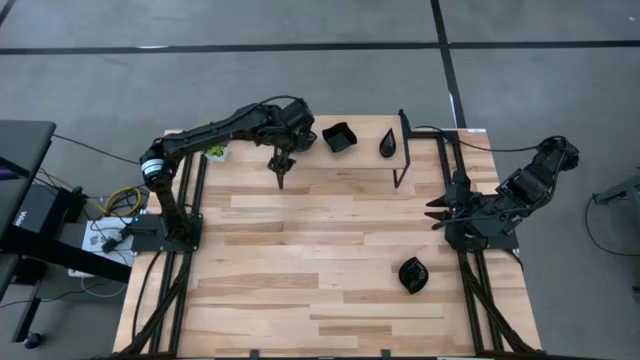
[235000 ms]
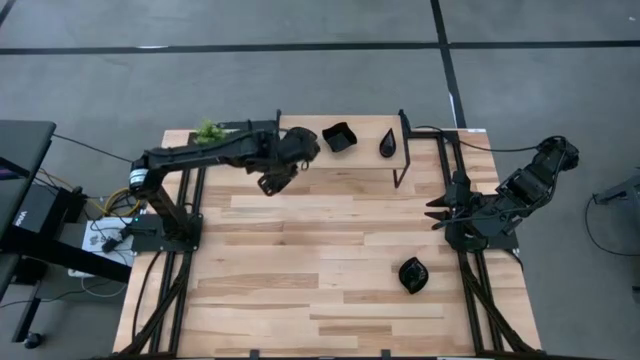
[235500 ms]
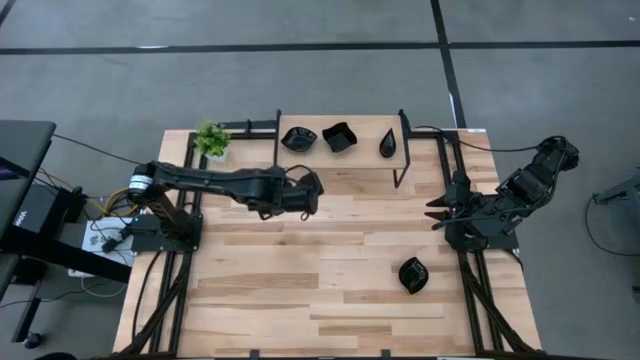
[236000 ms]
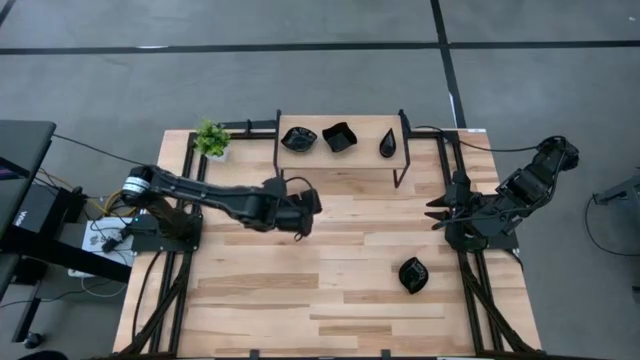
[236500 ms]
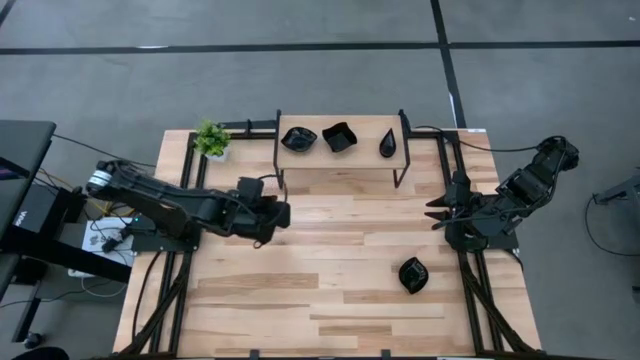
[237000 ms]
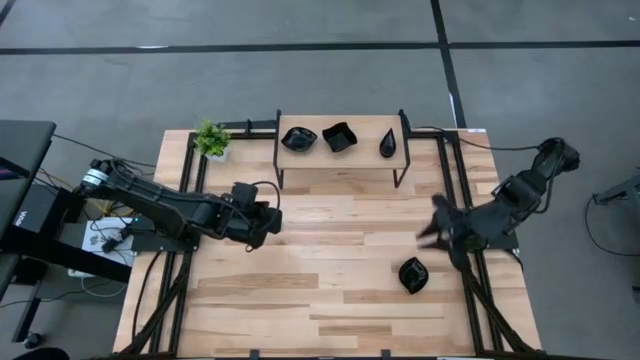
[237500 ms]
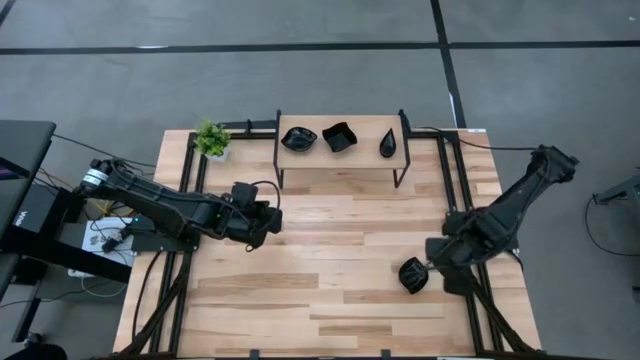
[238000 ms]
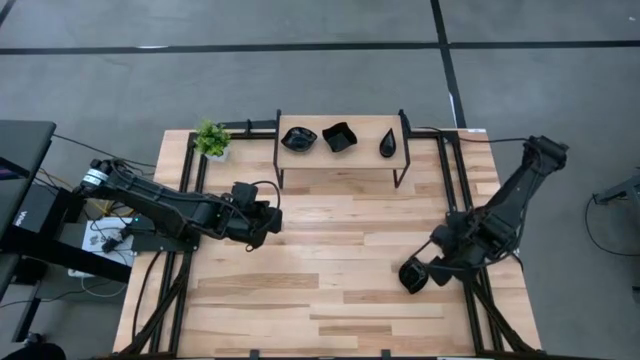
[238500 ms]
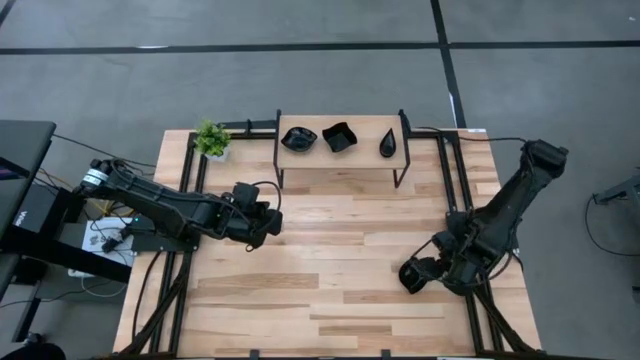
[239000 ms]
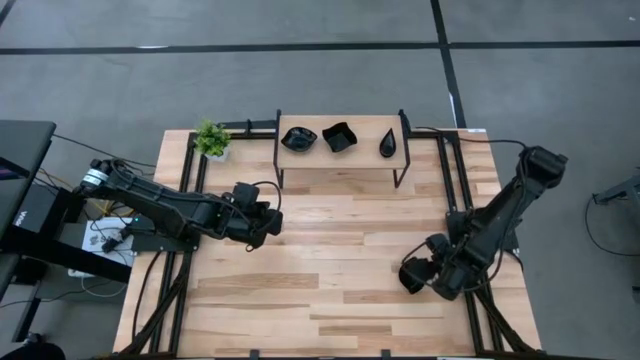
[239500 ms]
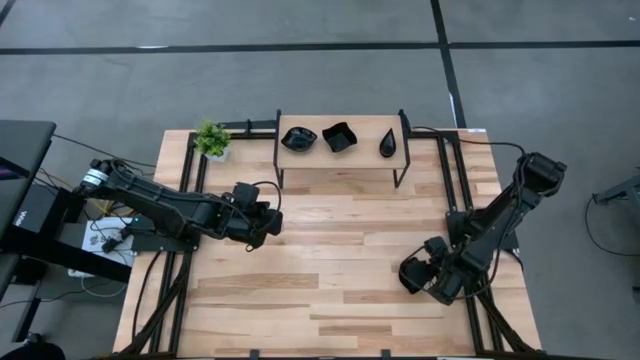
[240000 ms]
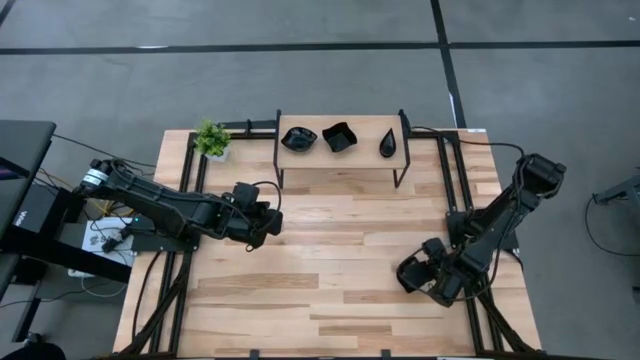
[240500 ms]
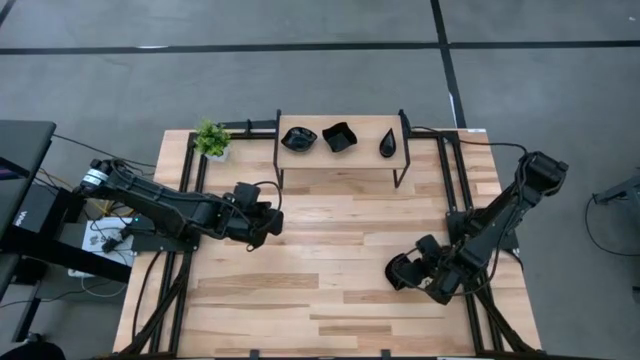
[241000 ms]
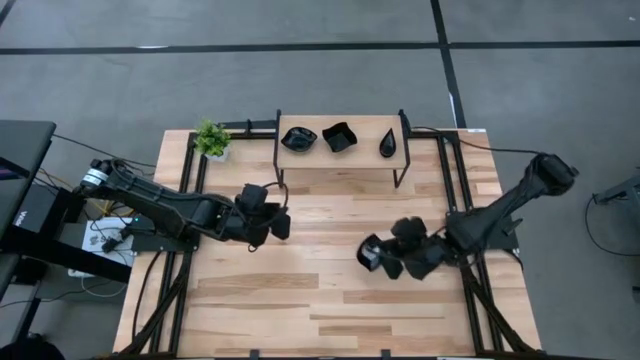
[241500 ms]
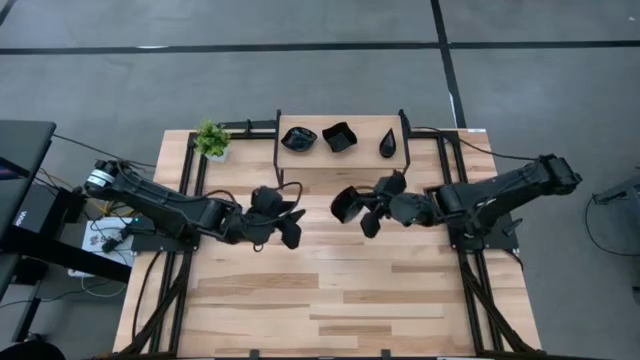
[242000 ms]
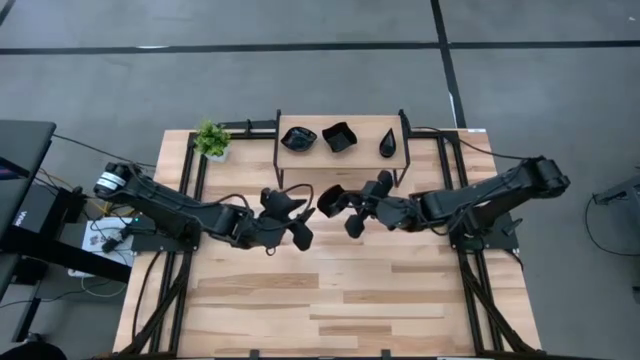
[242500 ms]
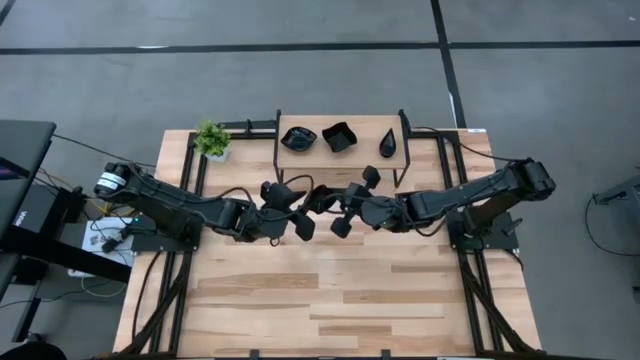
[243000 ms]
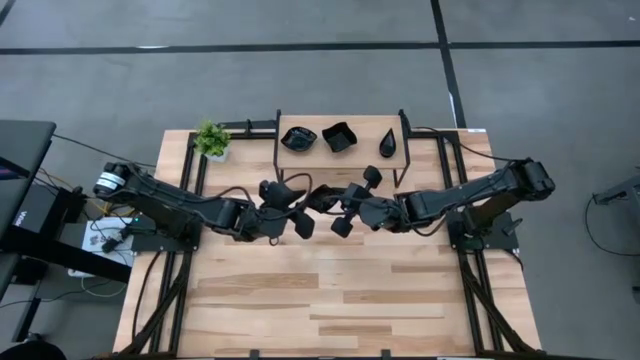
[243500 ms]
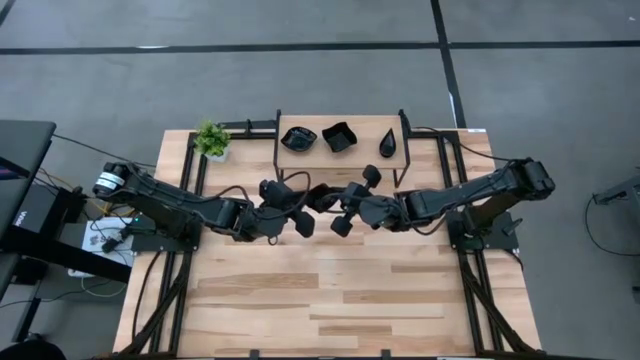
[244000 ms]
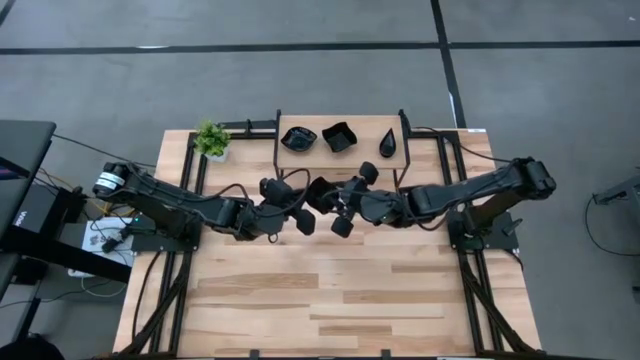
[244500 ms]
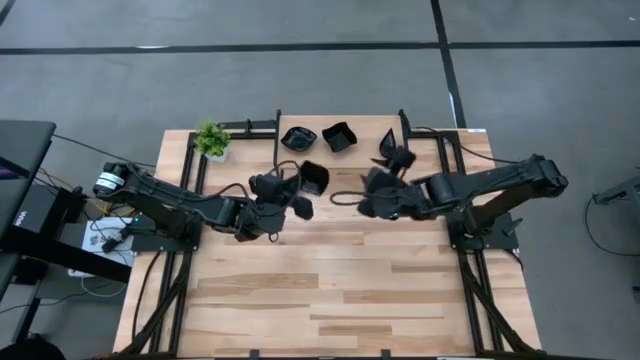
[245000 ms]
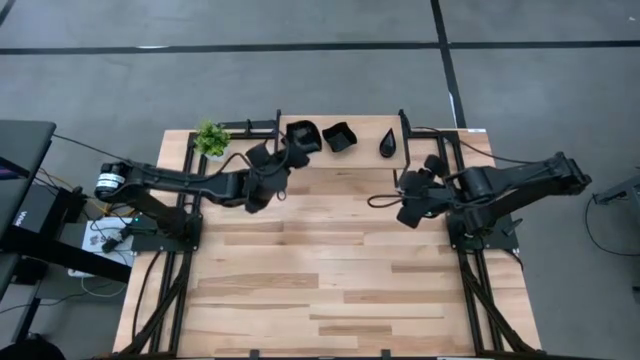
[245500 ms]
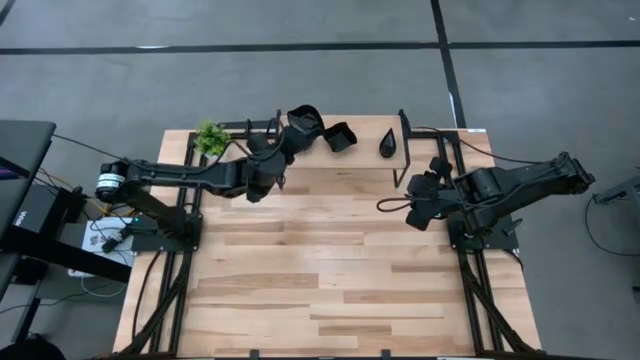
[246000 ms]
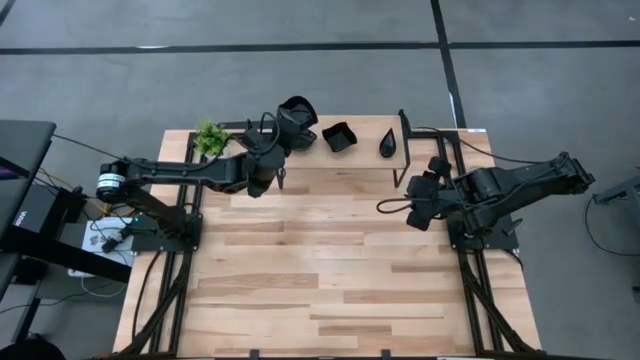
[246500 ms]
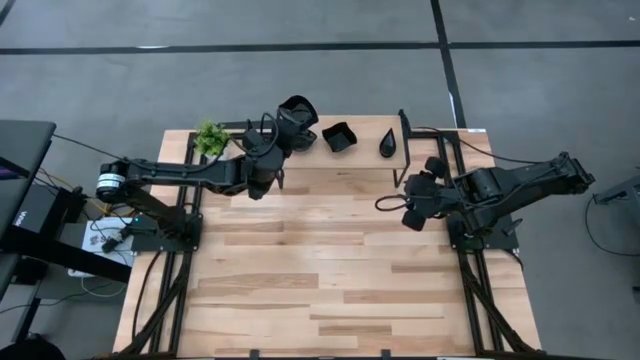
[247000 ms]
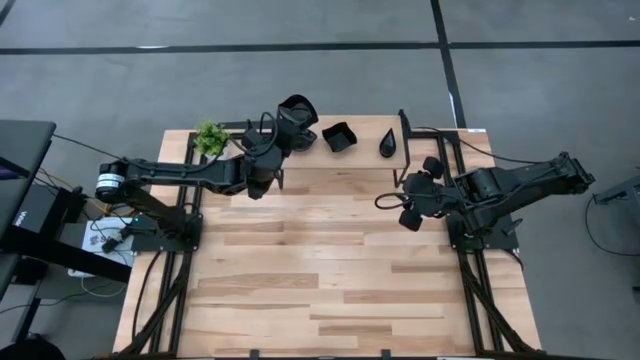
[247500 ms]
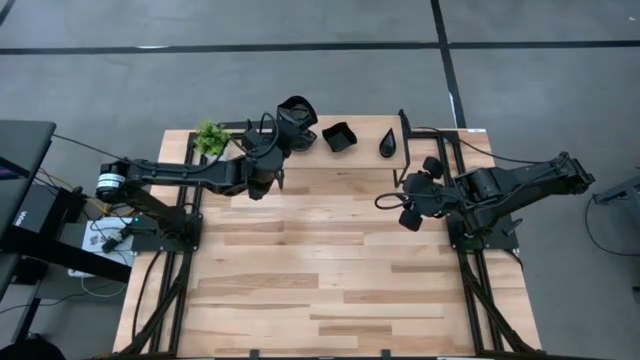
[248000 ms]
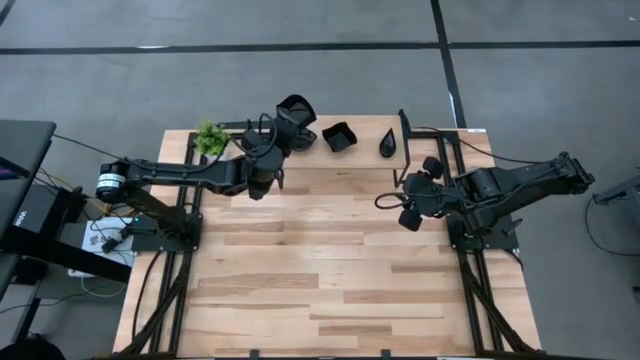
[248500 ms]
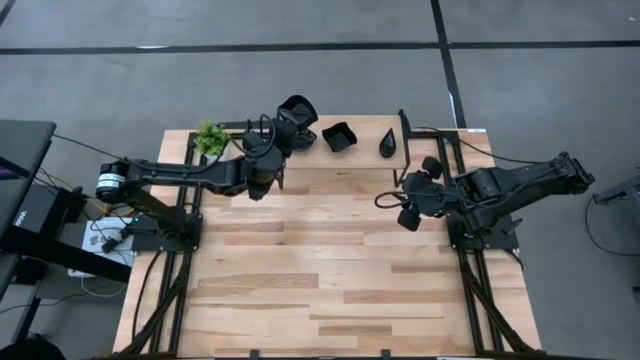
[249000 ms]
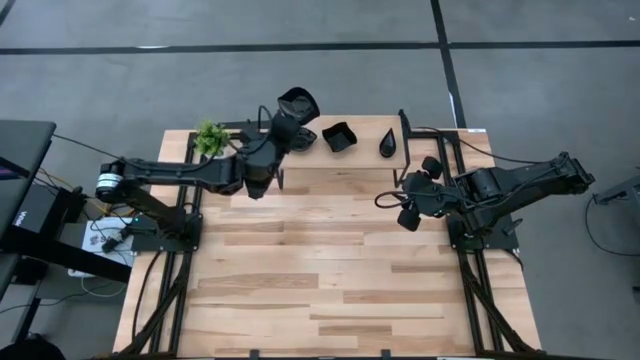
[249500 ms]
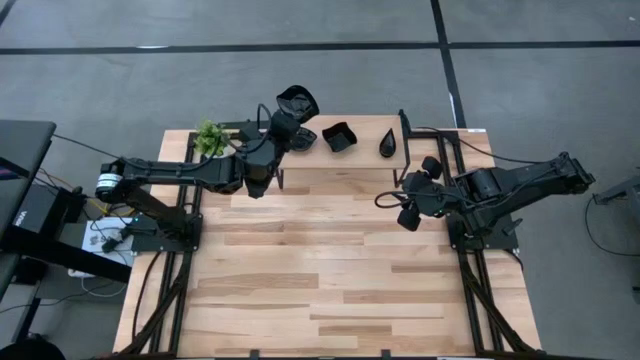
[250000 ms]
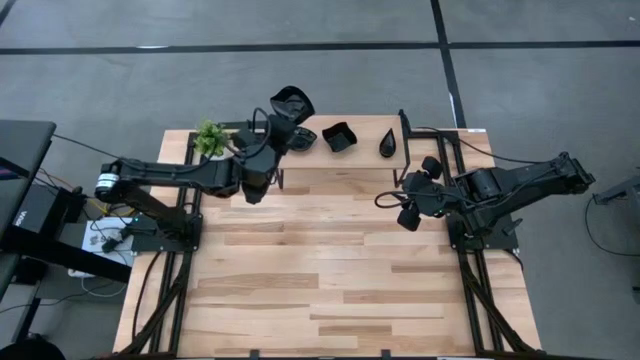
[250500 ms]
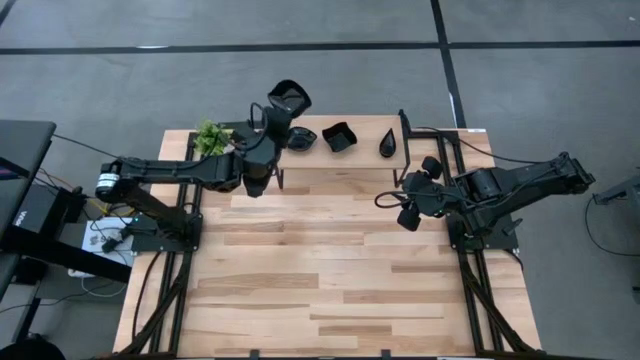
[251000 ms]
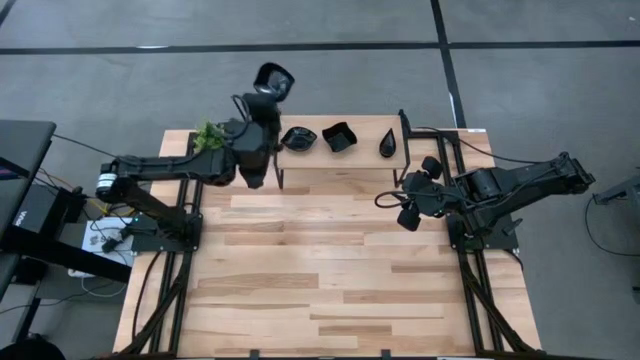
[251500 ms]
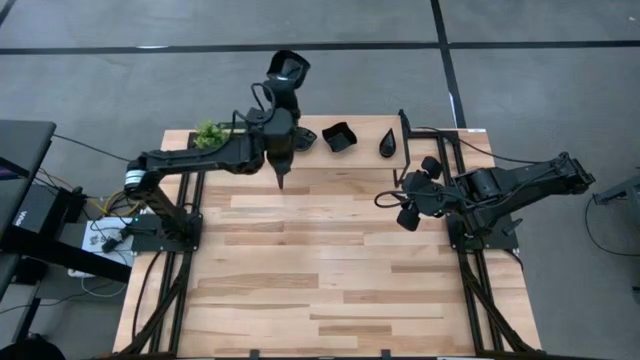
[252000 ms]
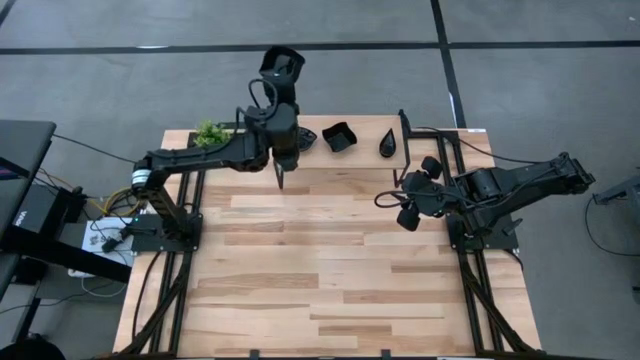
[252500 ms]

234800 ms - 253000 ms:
Task: Pick & Place Mini shaped plates
Stack the black plate on top of the black plate on the shelf

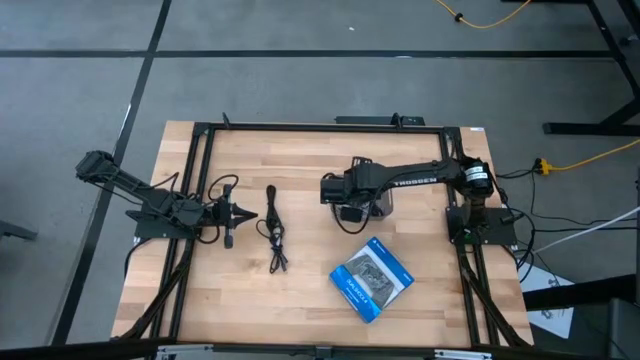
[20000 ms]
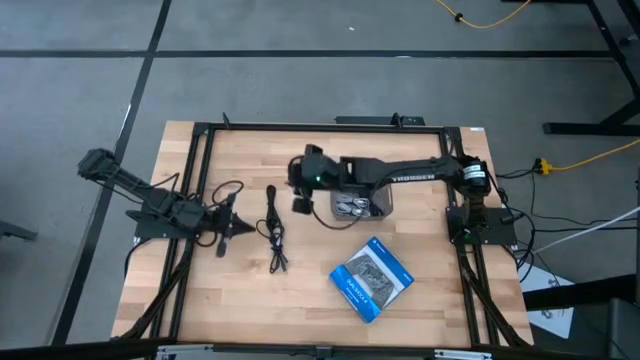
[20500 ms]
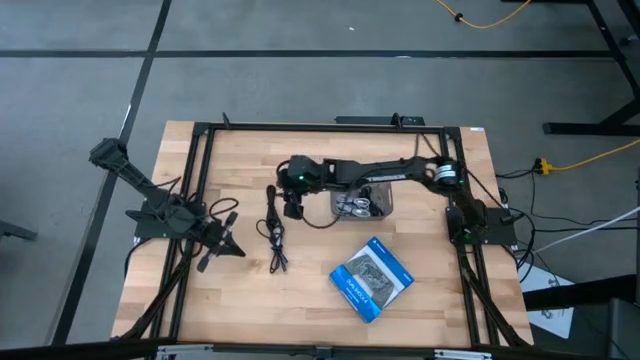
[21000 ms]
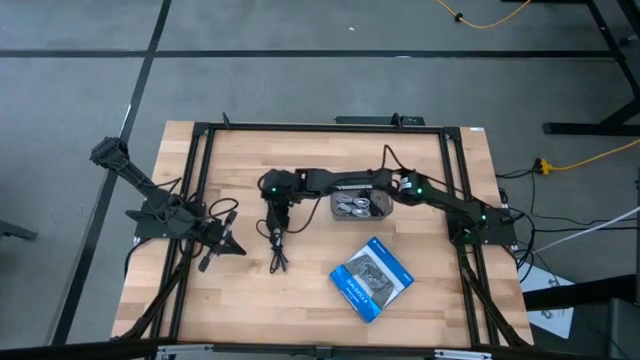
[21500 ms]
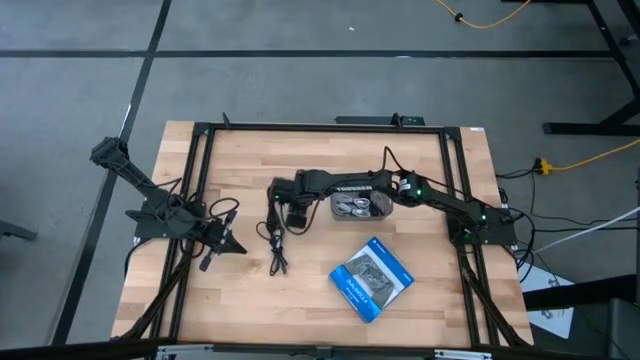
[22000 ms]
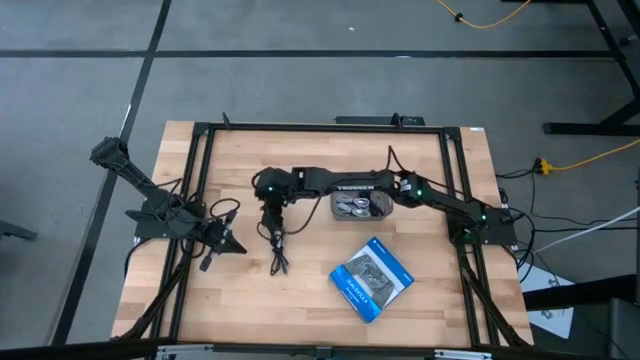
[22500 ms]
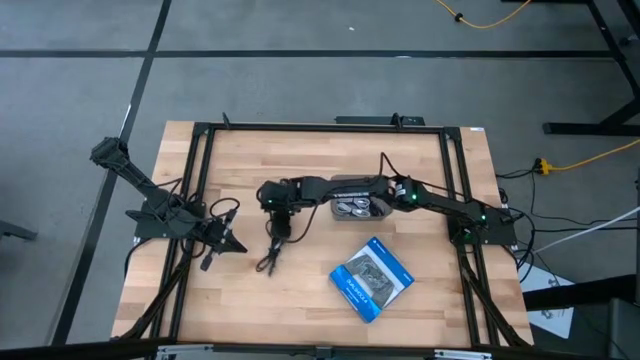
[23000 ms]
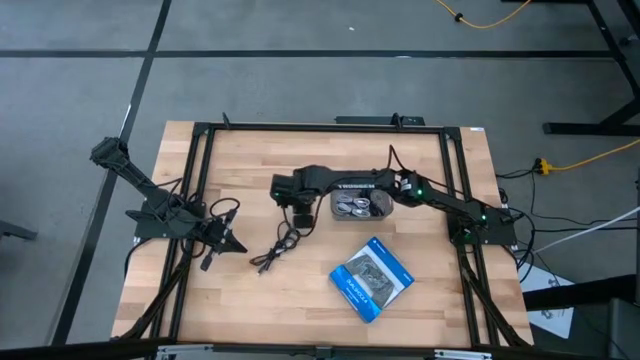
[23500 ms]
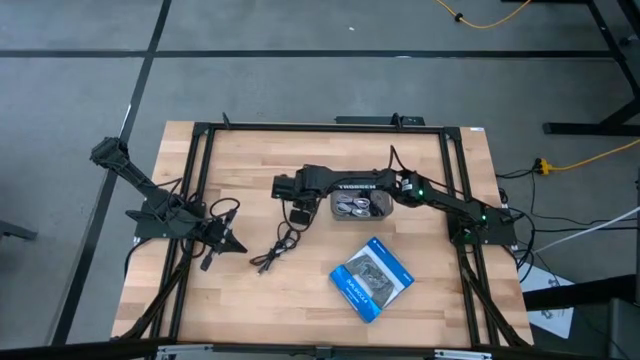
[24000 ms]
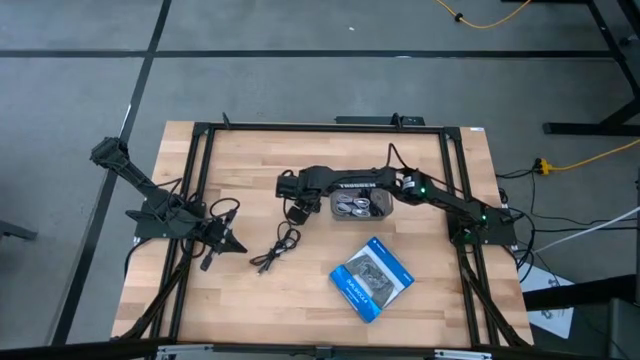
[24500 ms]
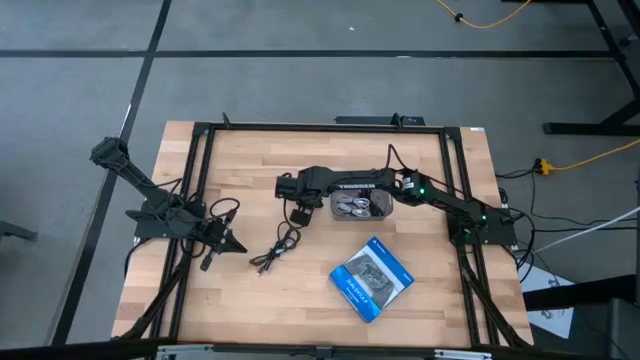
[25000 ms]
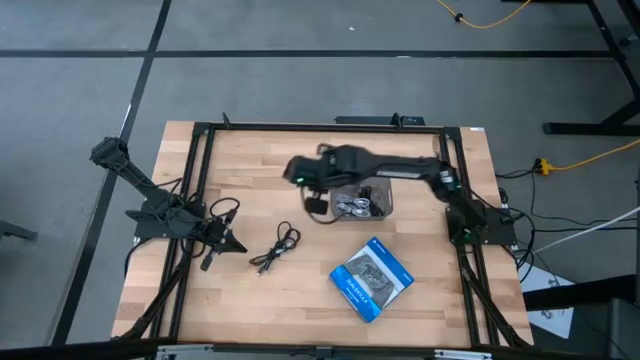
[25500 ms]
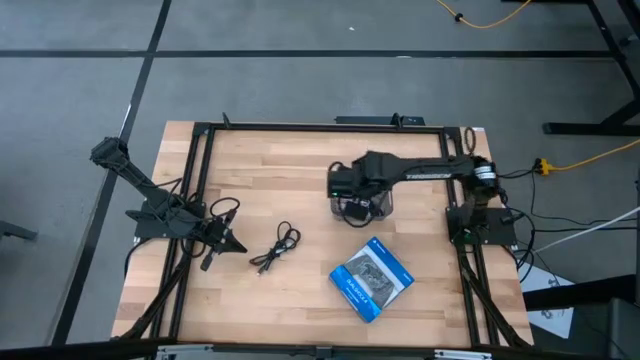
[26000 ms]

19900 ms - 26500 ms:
Task: Pick and place USB-C Cables
Put the black charger cable into the gray bin
